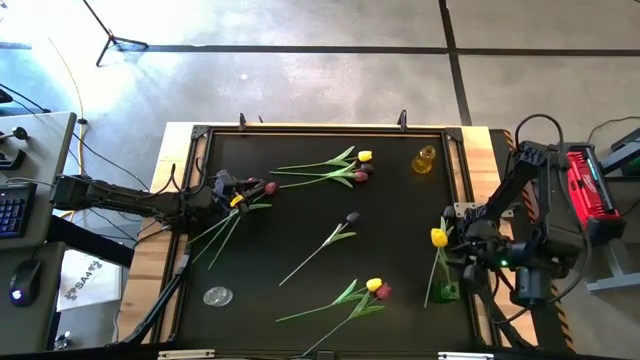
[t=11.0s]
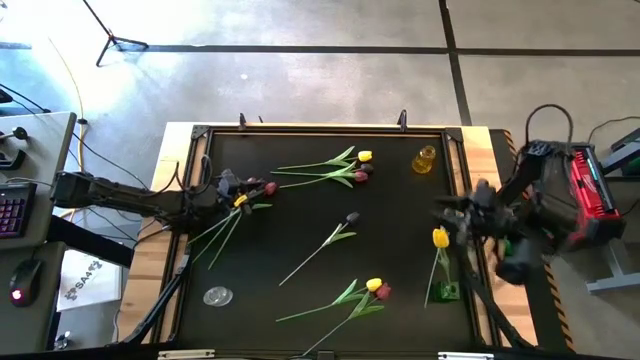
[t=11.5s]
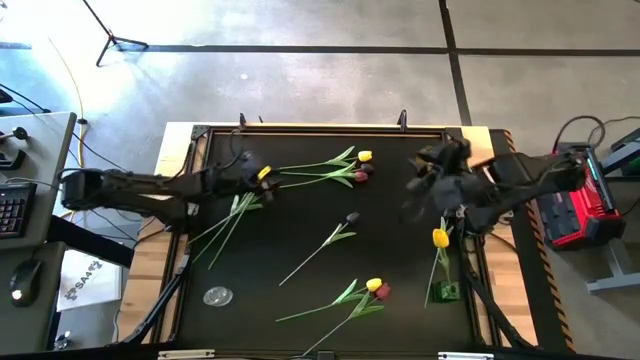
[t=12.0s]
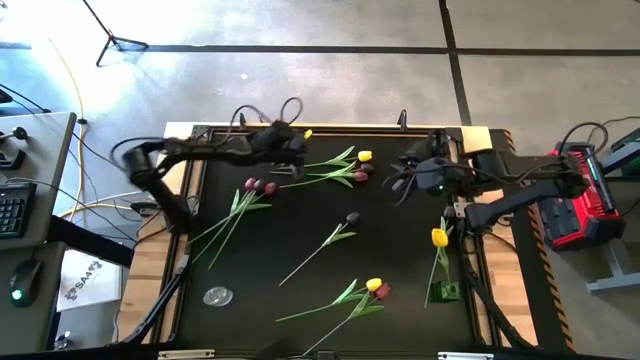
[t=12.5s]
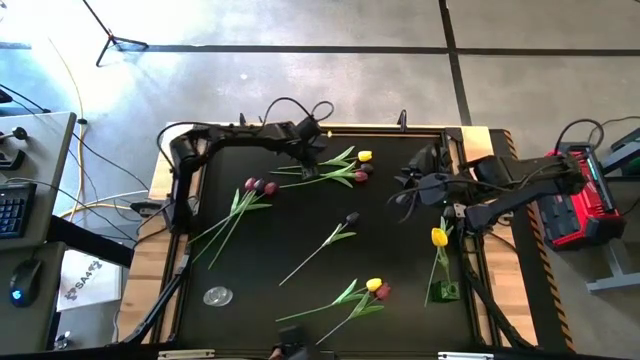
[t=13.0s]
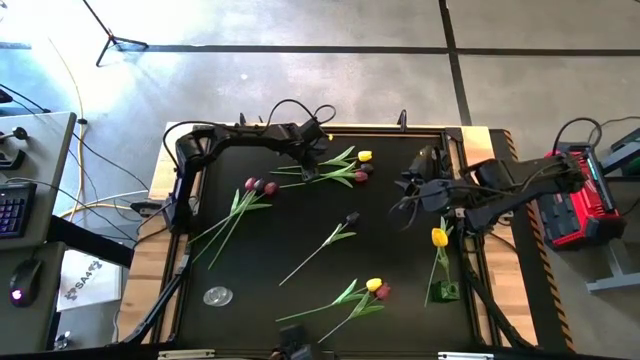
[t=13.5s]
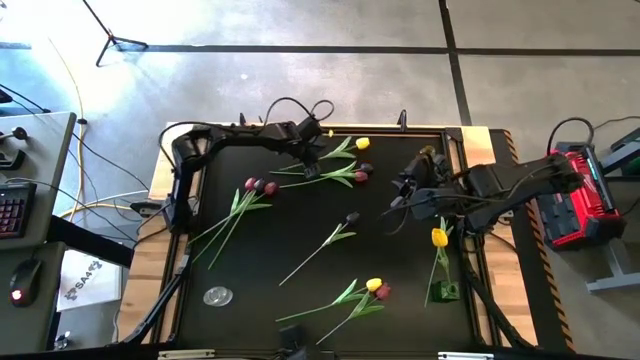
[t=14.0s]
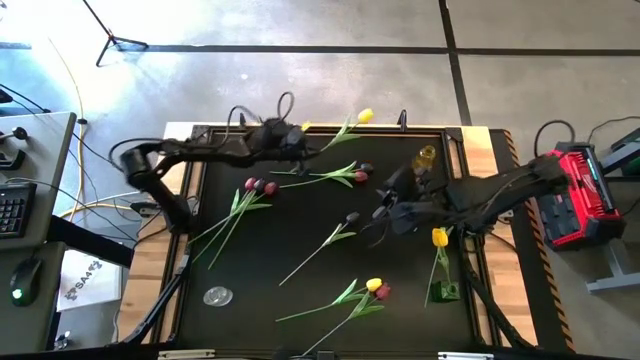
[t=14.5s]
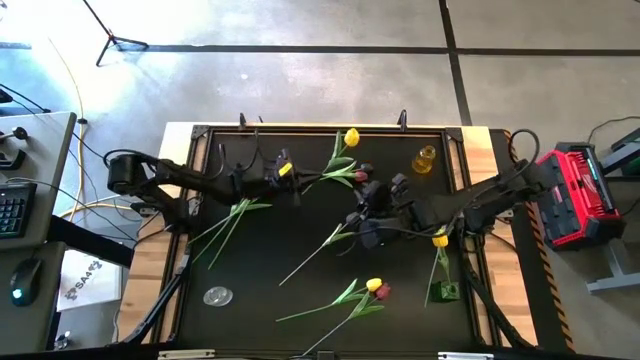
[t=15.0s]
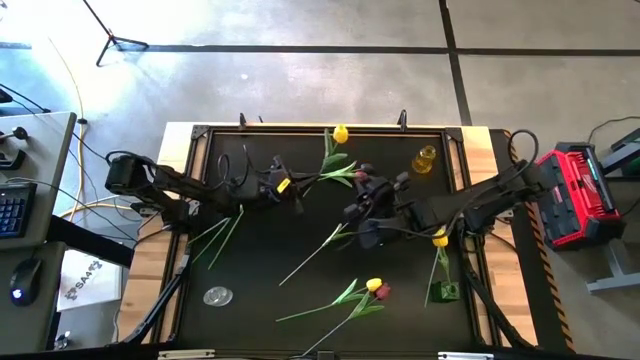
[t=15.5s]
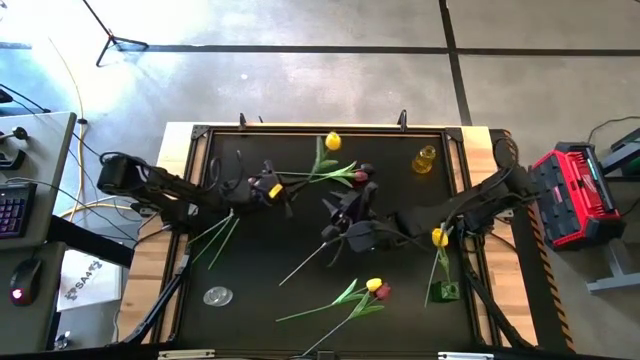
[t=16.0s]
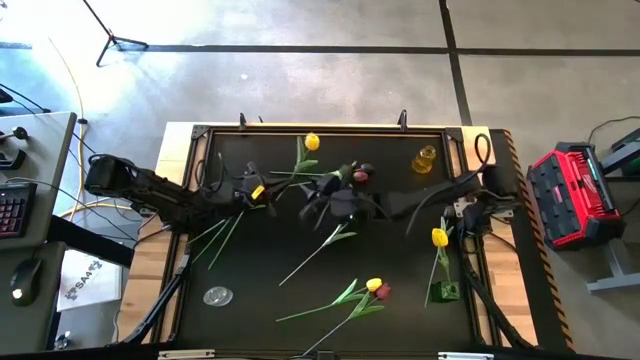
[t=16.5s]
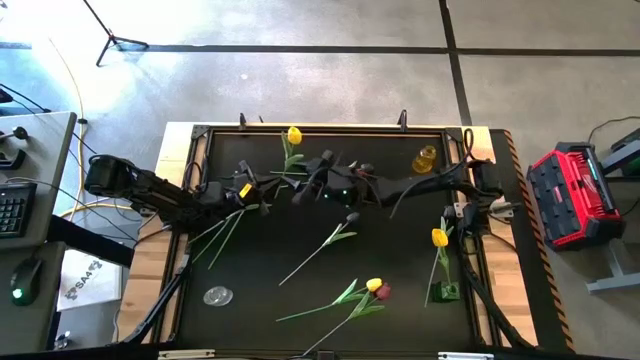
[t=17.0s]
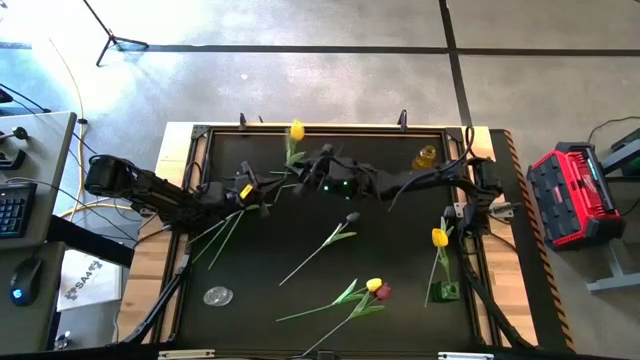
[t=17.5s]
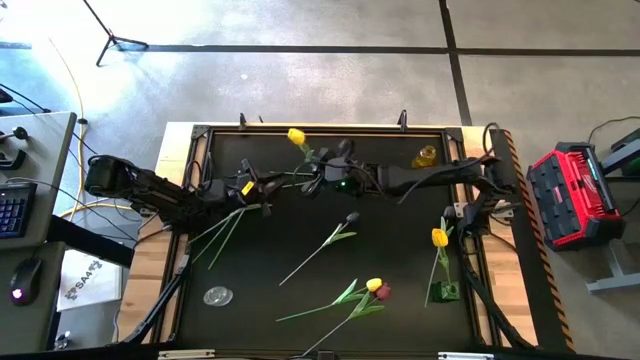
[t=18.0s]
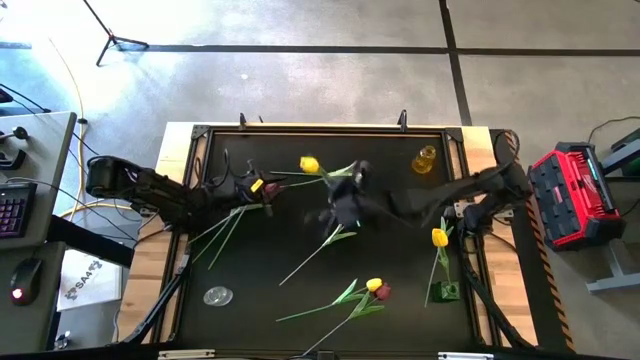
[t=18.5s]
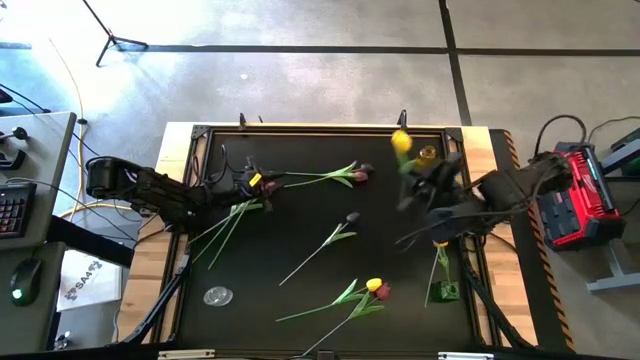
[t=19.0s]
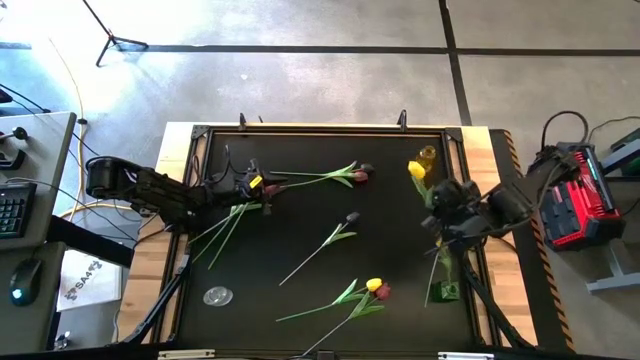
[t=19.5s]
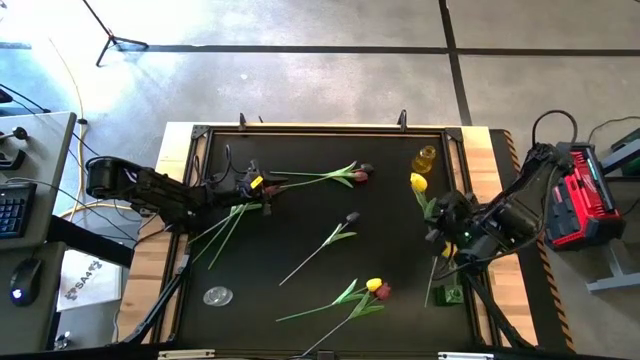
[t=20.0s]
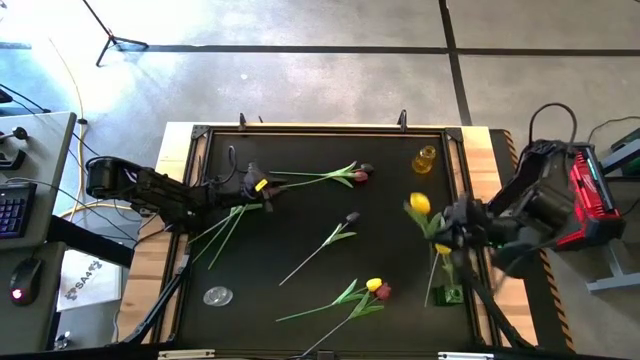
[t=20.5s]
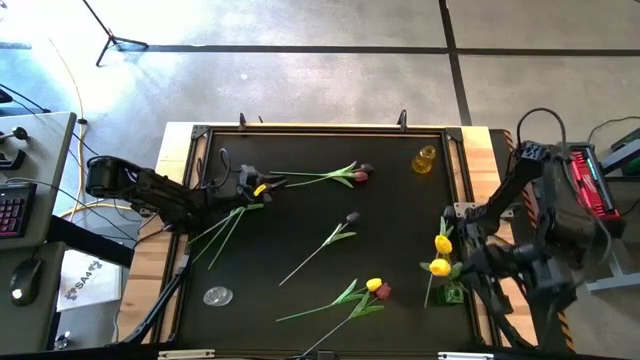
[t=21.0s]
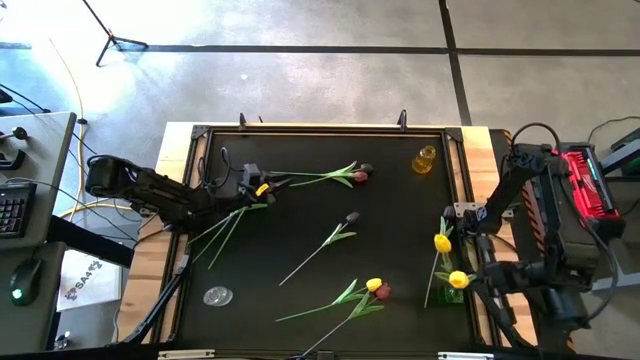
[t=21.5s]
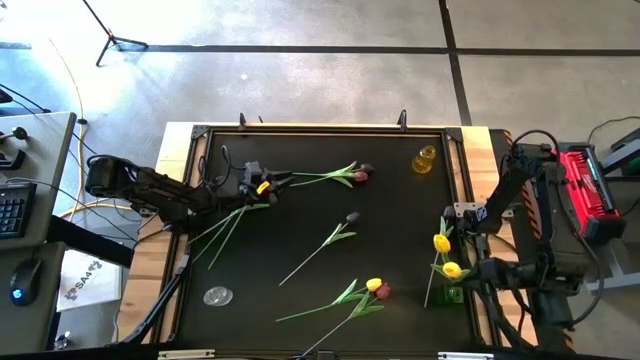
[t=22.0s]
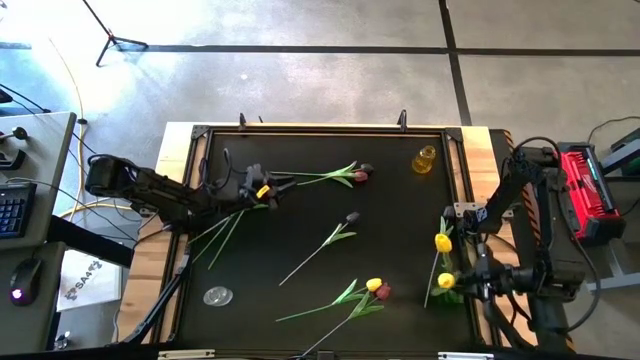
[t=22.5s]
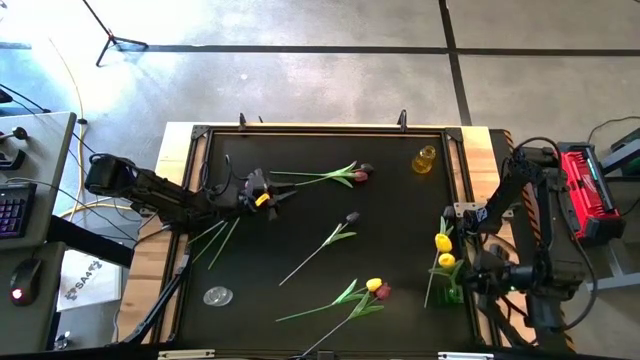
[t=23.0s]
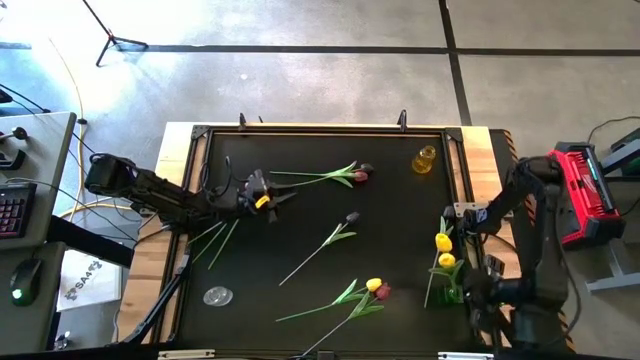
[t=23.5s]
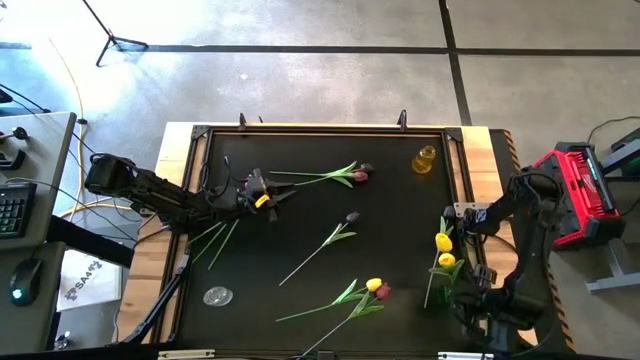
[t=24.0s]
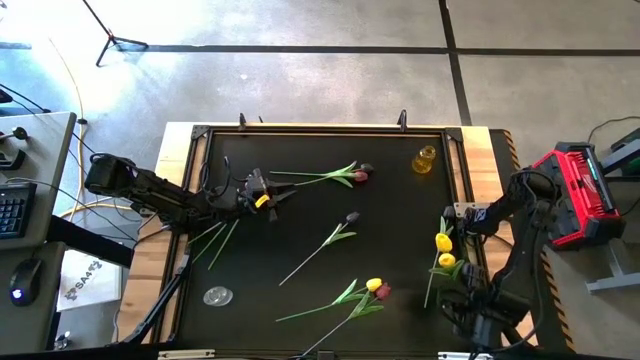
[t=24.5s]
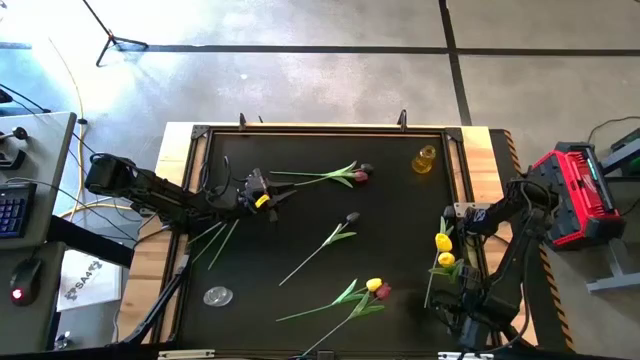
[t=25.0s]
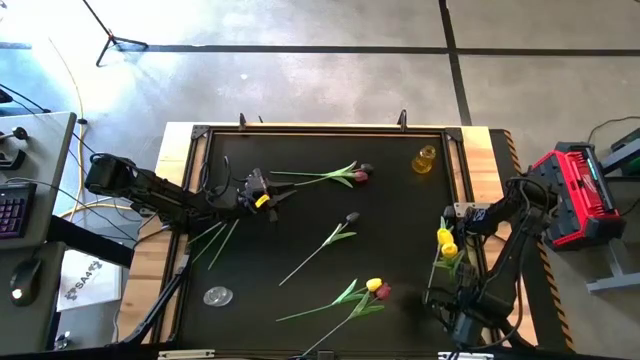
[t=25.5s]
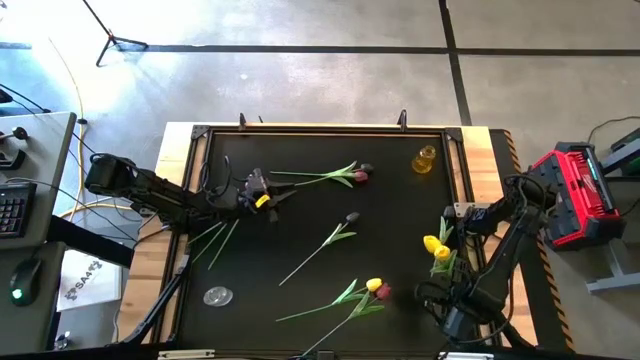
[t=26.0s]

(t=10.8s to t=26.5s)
Task: Sort flowers into vase by color
Put the top yellow flower into the green vase
